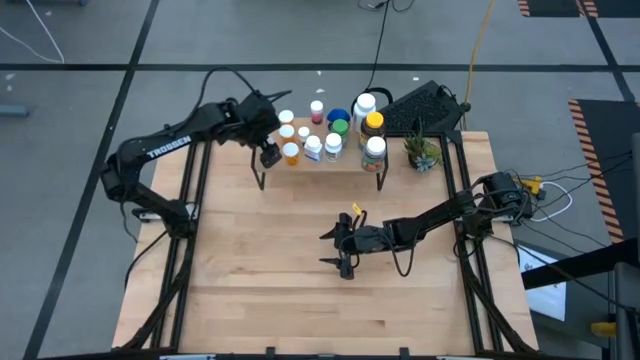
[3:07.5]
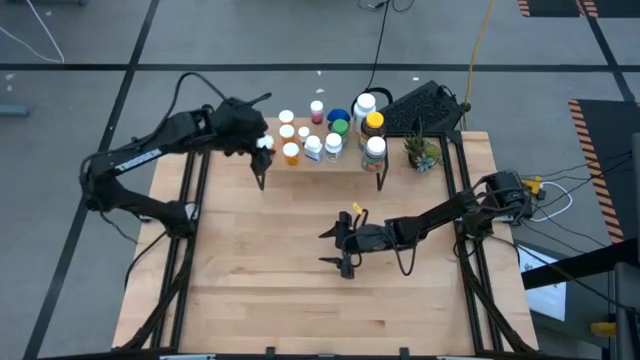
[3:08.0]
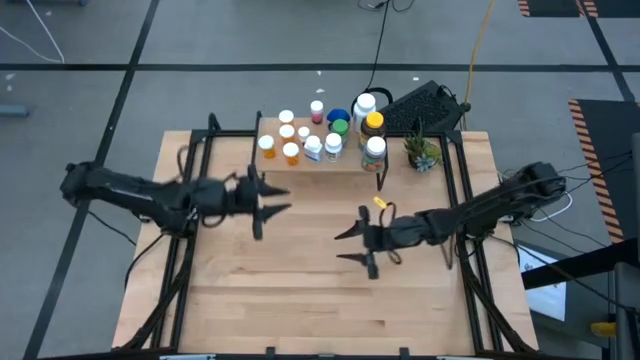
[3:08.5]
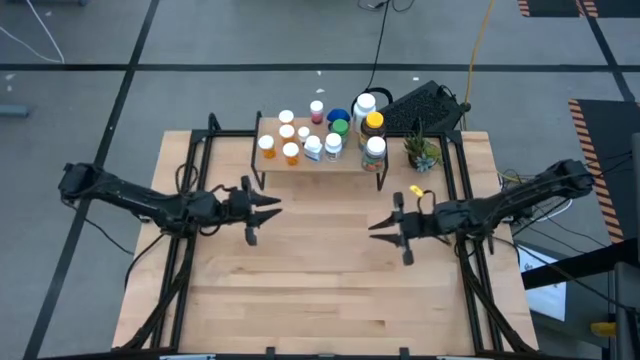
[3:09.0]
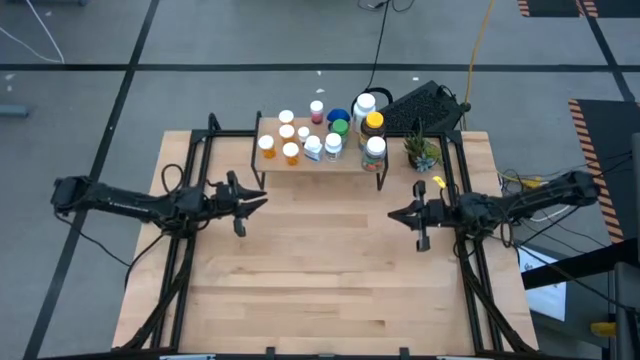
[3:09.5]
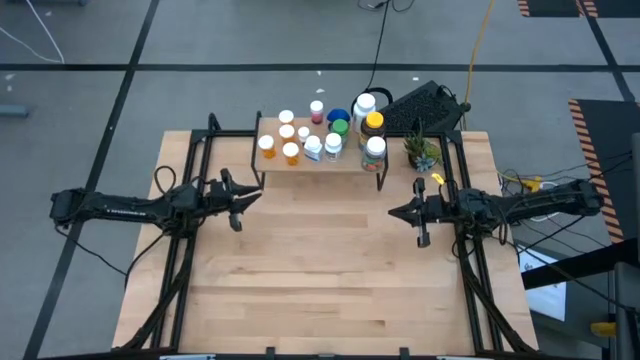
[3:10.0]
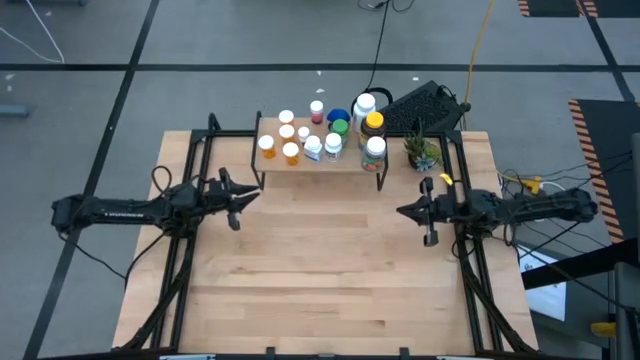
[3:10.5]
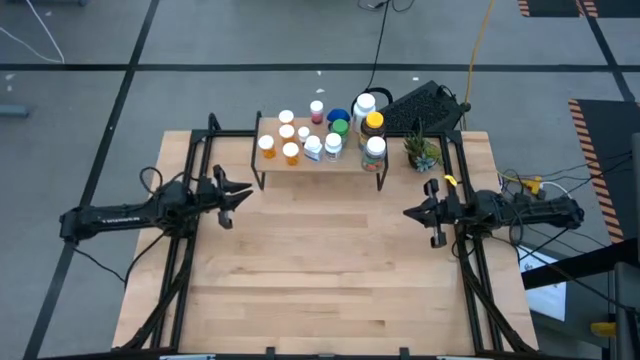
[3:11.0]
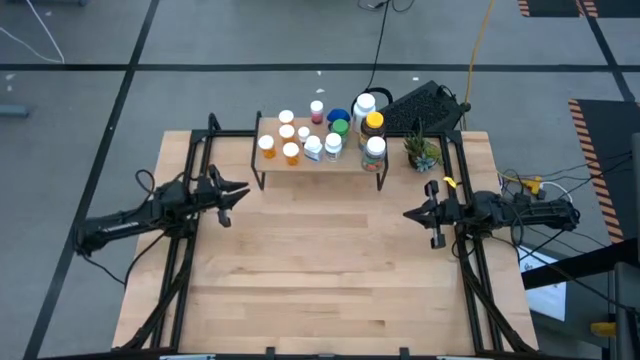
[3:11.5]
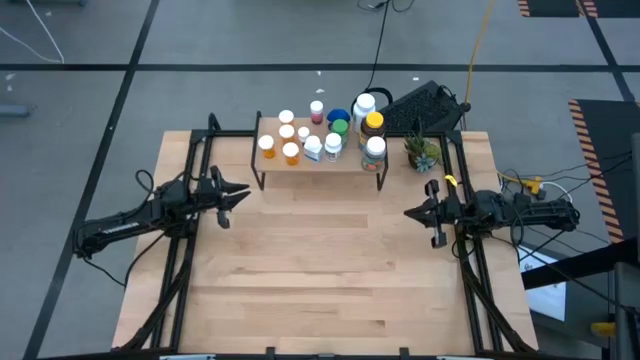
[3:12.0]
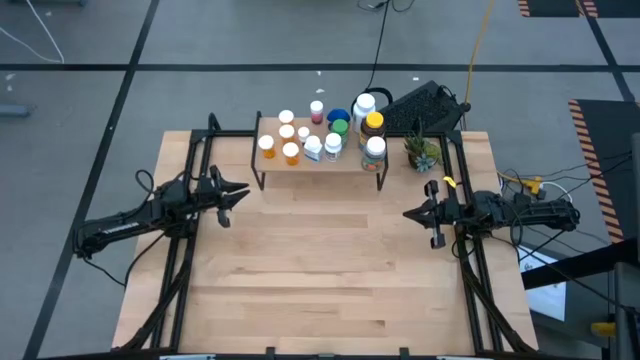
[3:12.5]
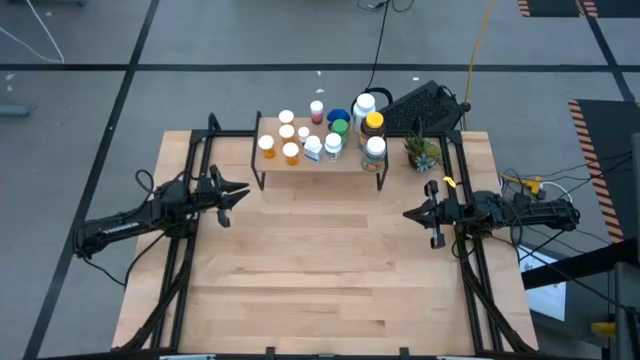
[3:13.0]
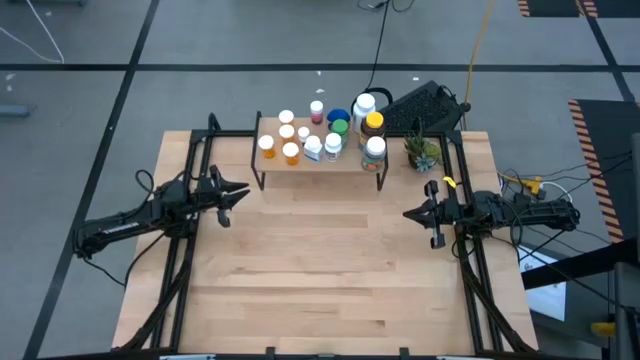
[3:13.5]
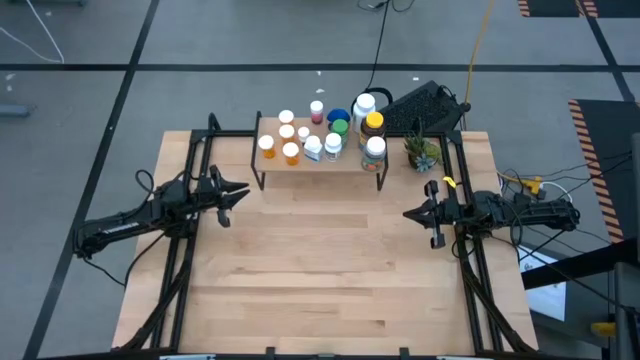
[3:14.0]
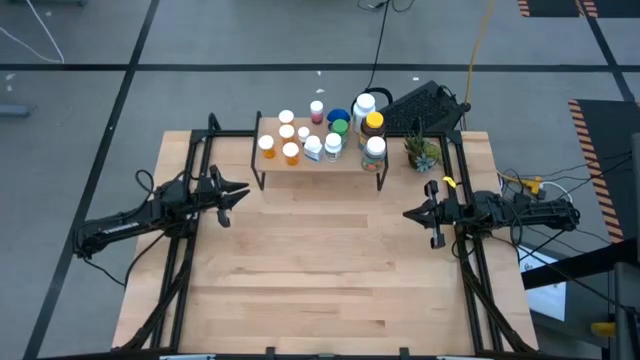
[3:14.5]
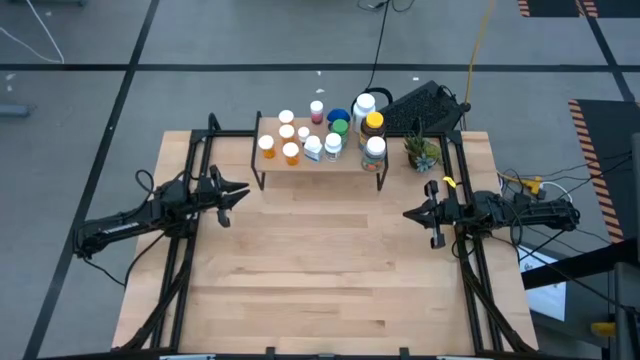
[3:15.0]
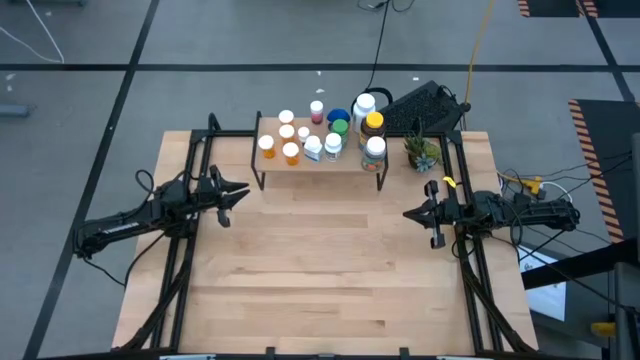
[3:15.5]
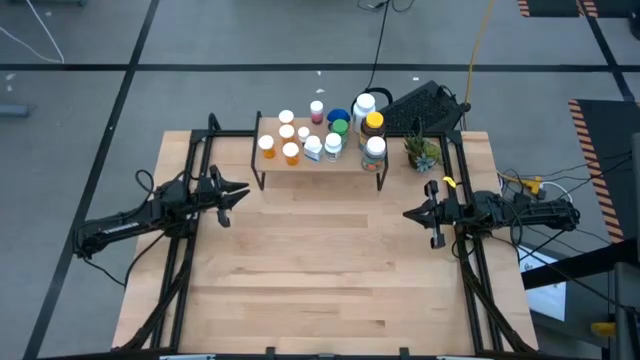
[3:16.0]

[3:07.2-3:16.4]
Task: Pick and place medicine bottles onto shelf by color
Return to Home Position

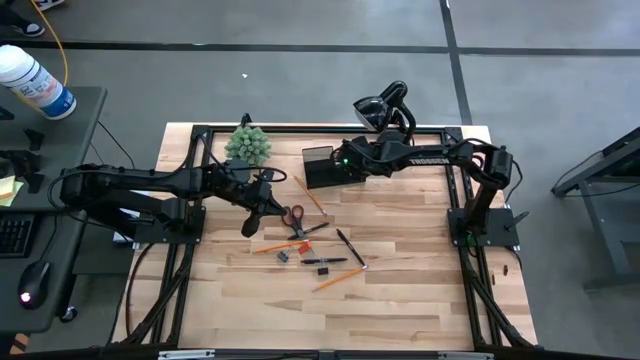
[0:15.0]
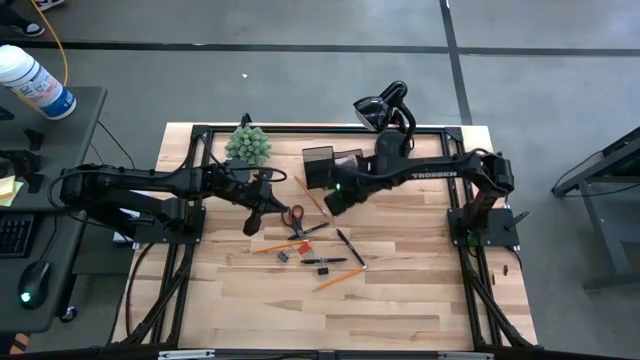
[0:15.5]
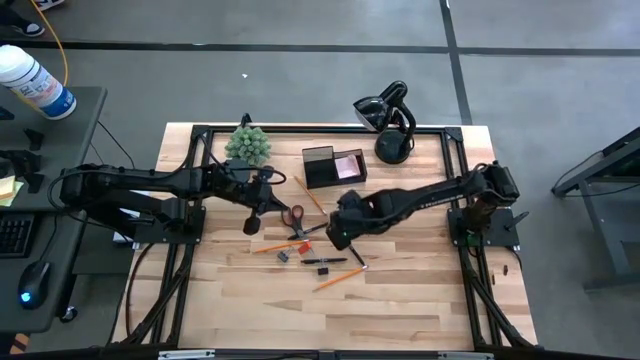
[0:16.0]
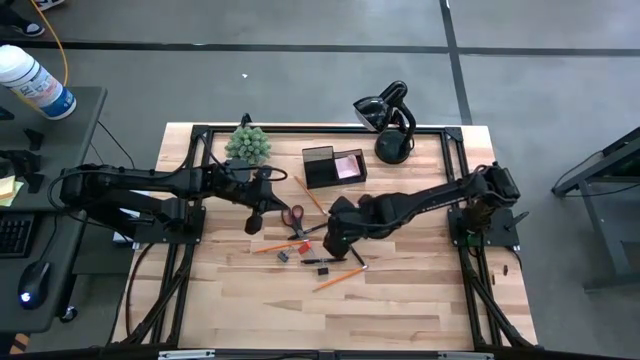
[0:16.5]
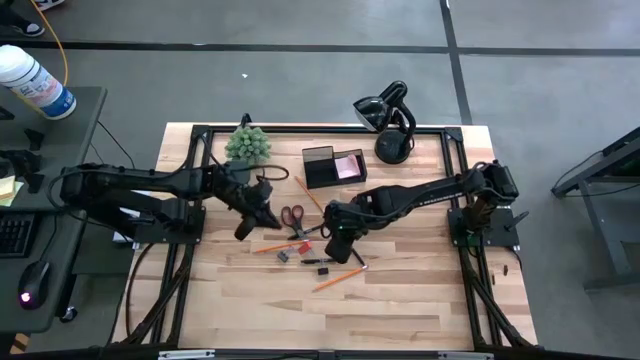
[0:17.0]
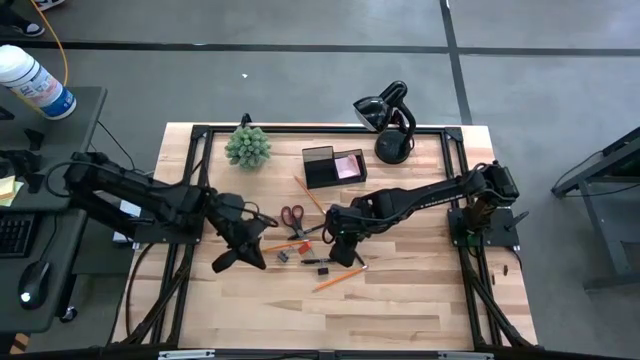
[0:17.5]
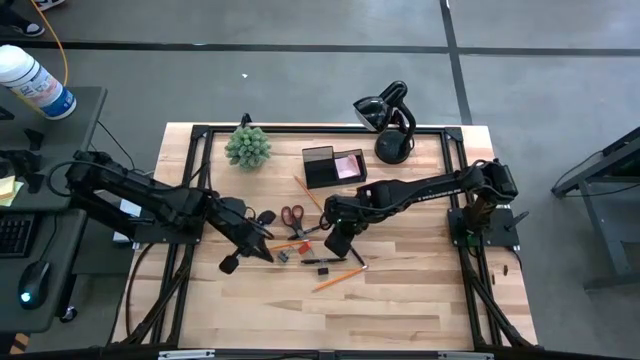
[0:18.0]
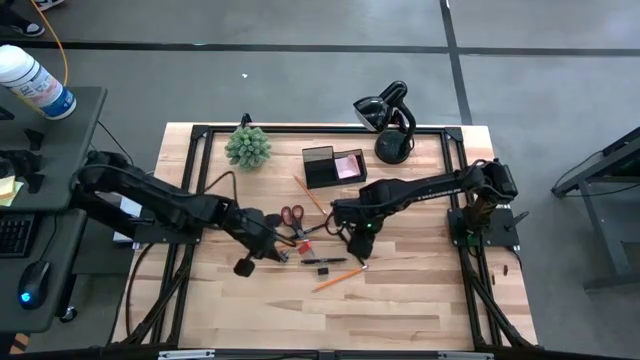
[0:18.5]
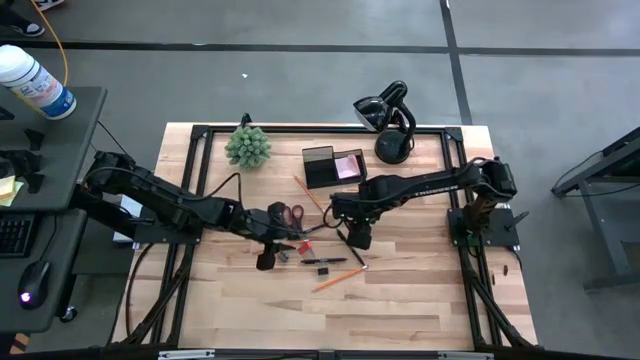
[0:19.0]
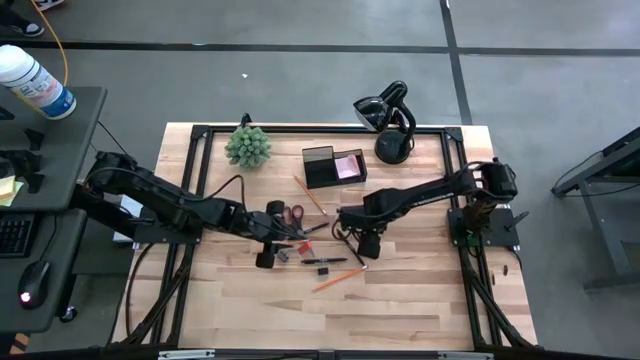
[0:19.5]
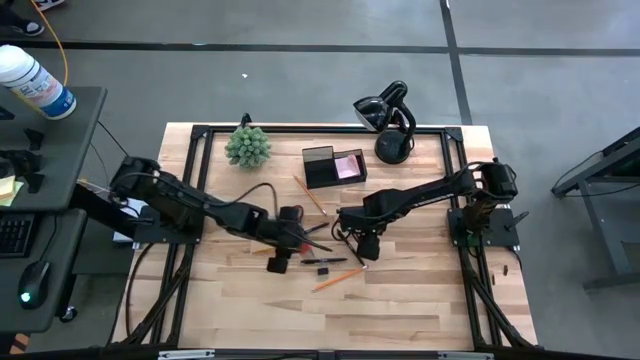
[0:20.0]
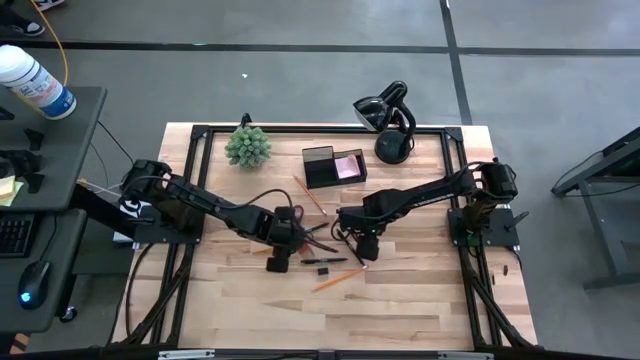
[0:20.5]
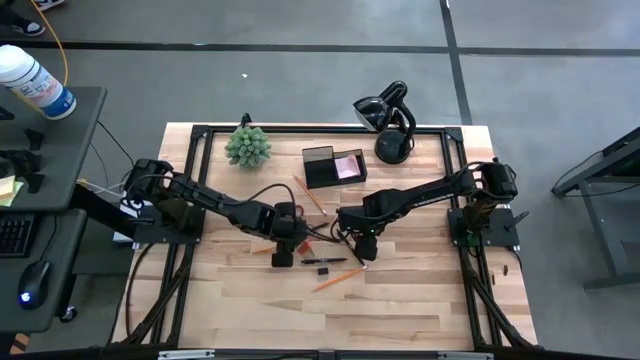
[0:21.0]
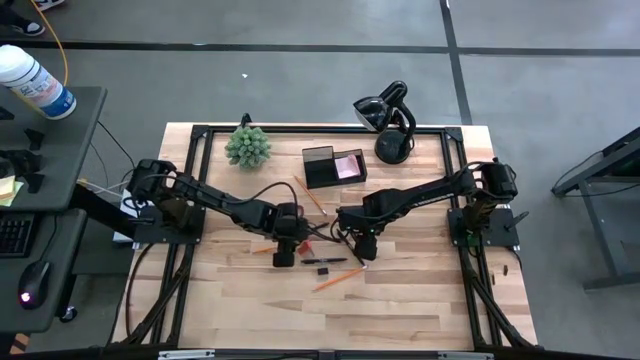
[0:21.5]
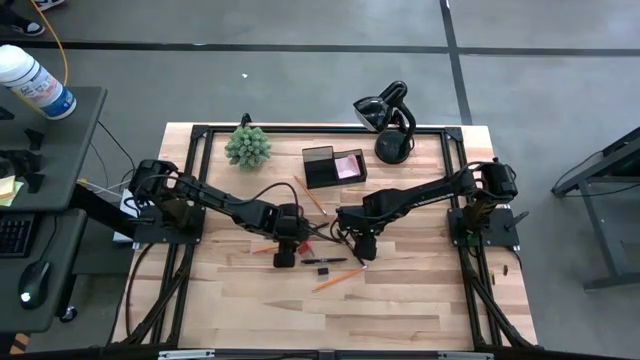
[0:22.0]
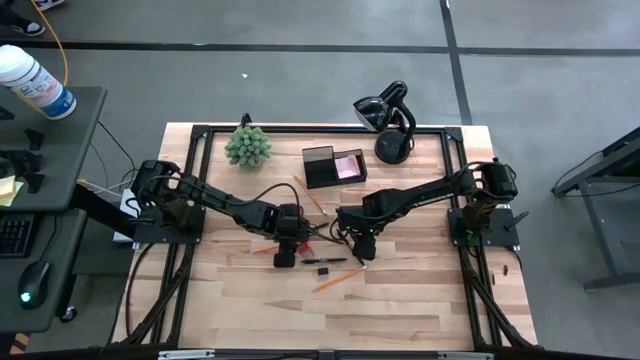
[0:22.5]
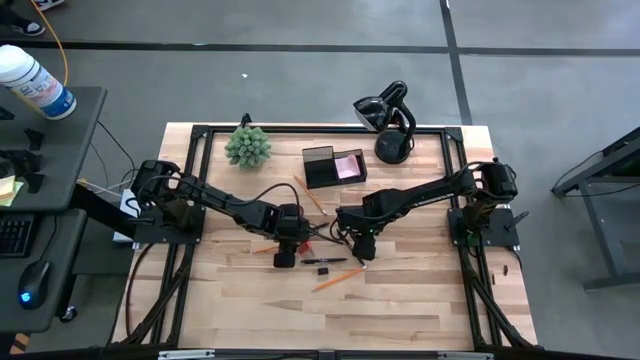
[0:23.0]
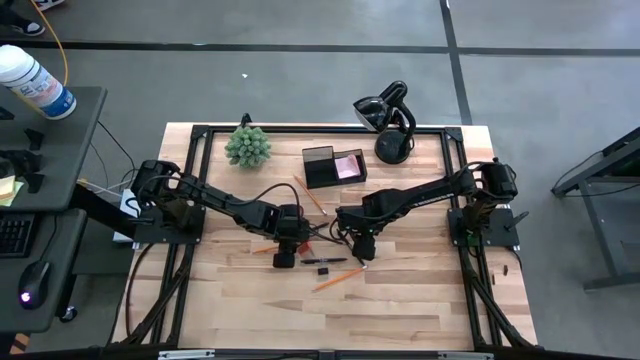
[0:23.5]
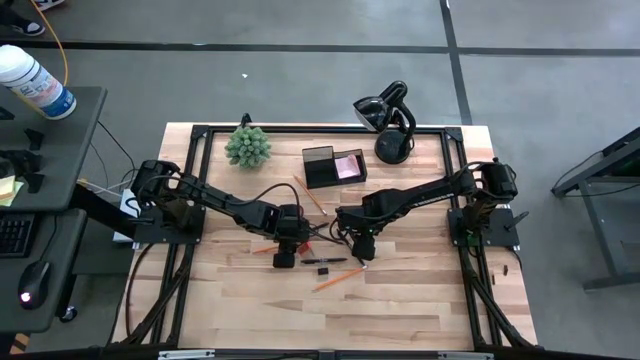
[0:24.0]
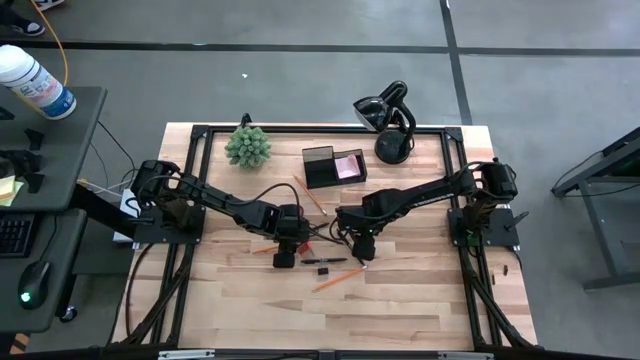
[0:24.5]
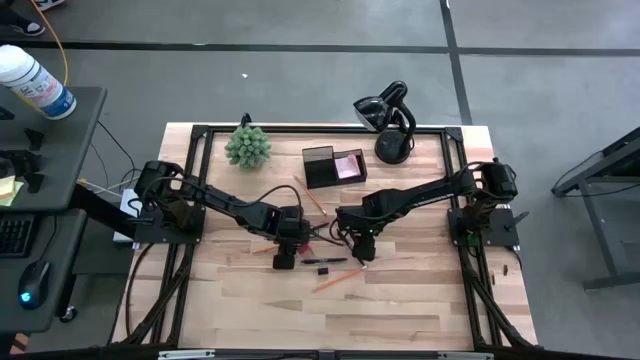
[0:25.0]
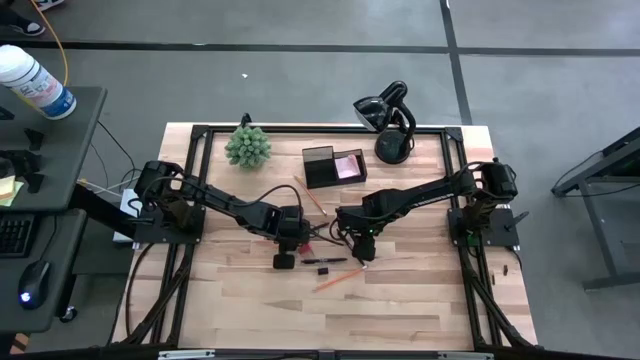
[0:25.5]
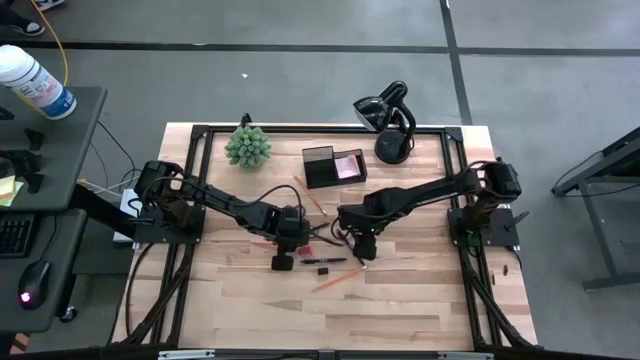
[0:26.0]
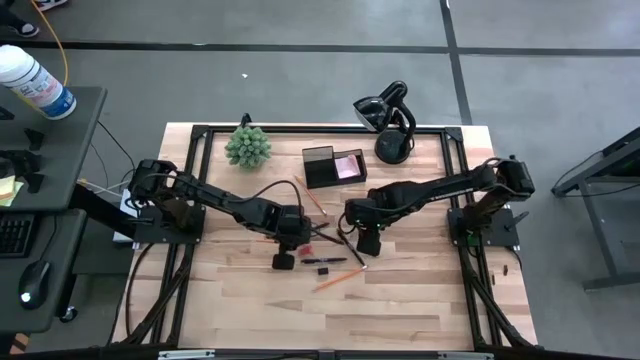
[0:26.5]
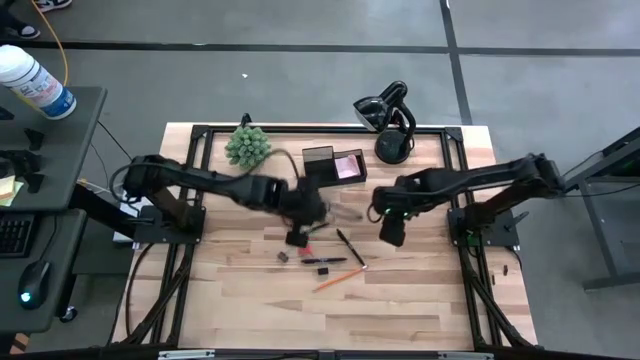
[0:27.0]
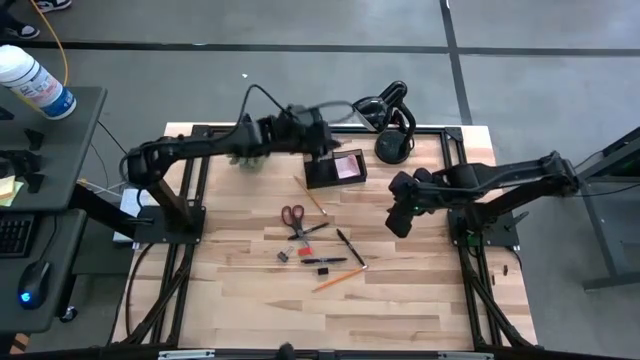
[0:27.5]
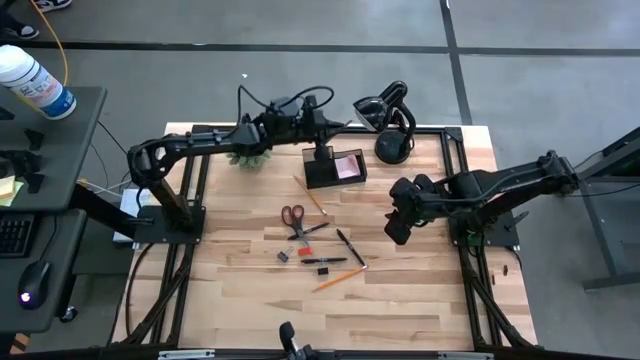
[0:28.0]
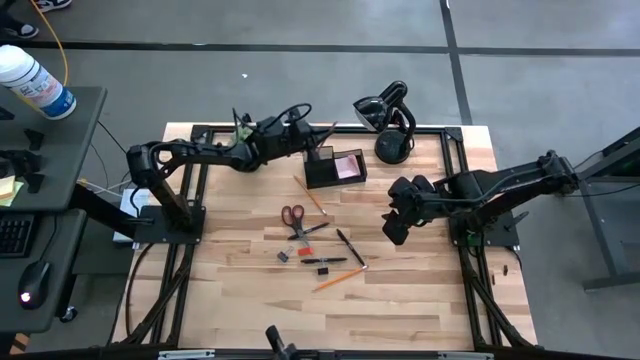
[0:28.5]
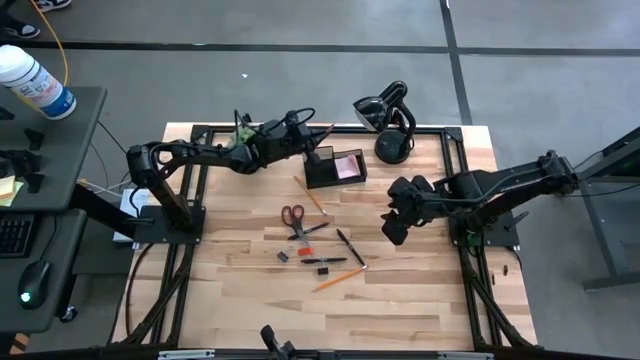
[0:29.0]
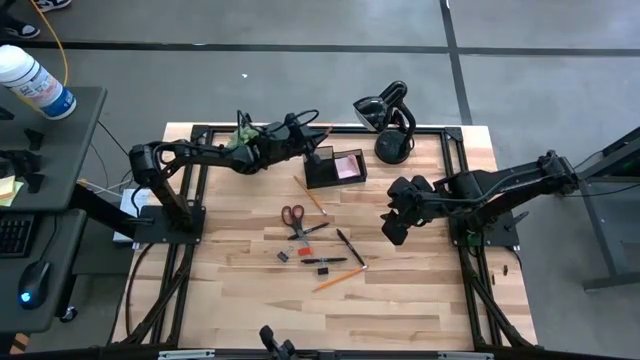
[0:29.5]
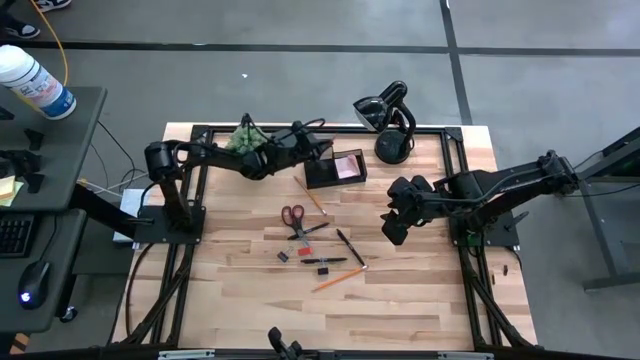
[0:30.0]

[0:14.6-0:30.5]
Task: Pick and place office supplies into organizer
Put the middle orange pencil into the black desk organizer
